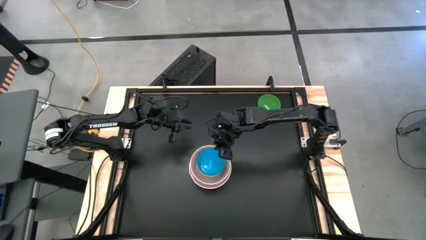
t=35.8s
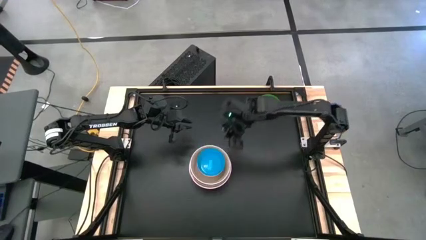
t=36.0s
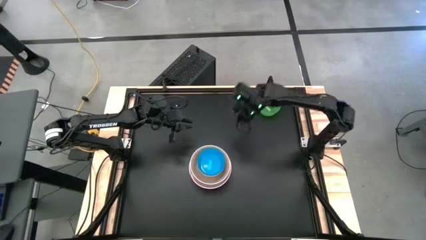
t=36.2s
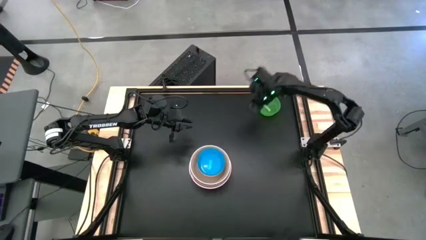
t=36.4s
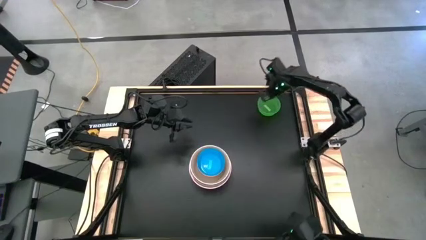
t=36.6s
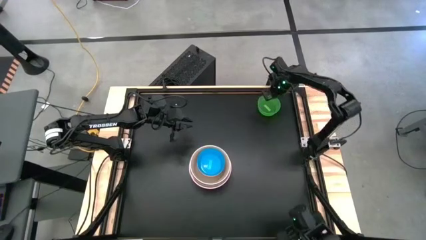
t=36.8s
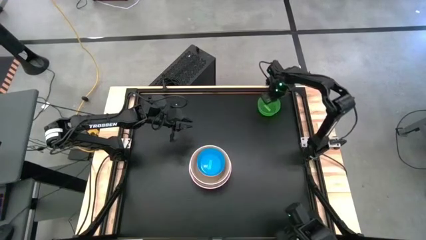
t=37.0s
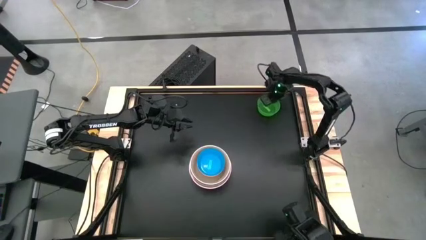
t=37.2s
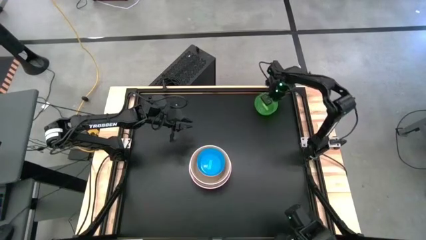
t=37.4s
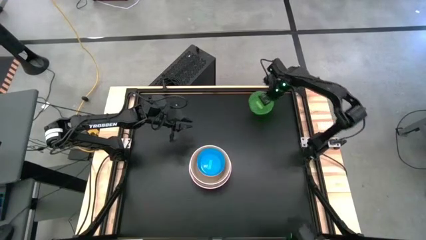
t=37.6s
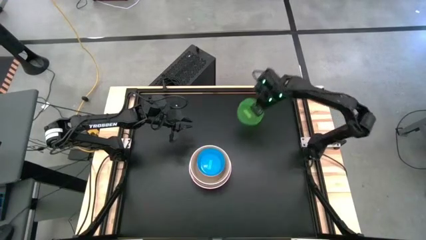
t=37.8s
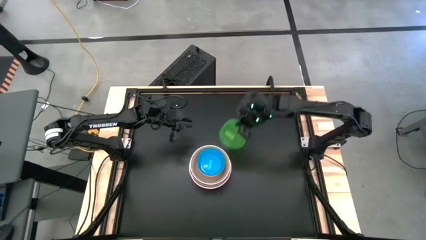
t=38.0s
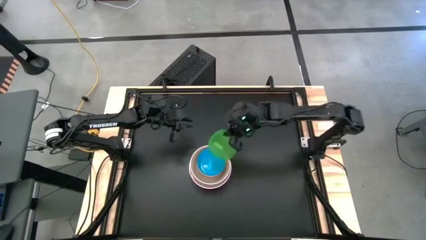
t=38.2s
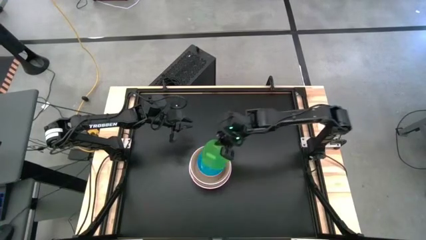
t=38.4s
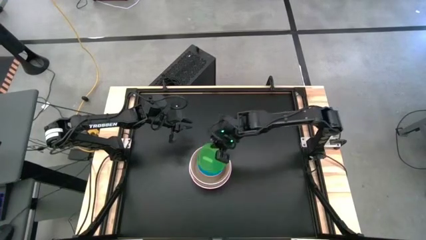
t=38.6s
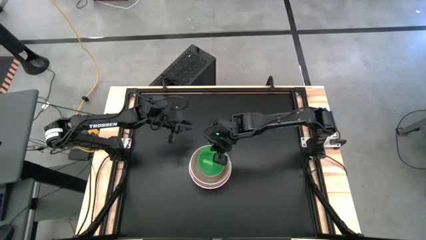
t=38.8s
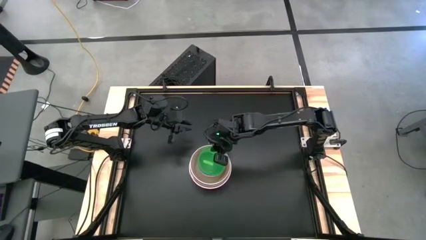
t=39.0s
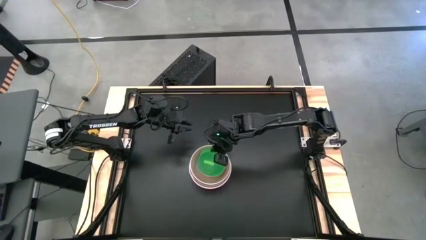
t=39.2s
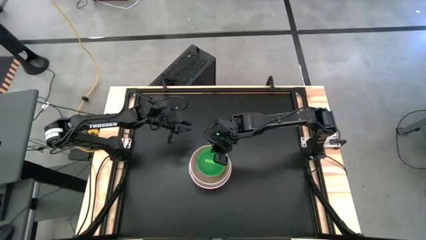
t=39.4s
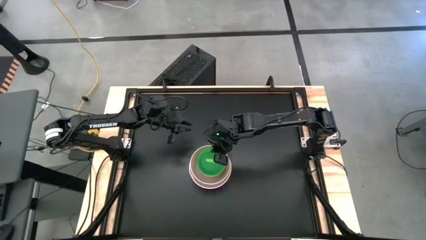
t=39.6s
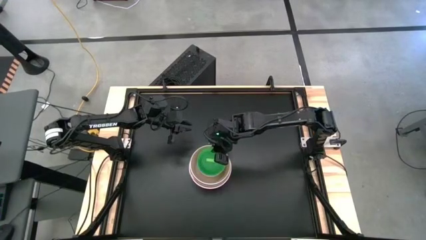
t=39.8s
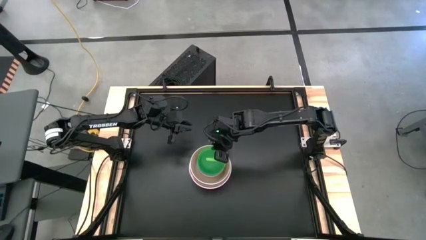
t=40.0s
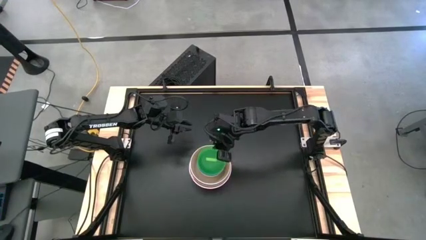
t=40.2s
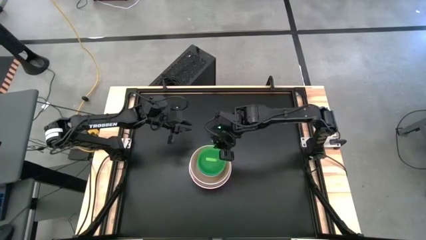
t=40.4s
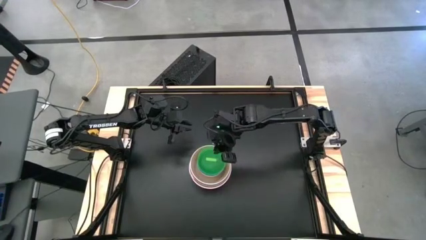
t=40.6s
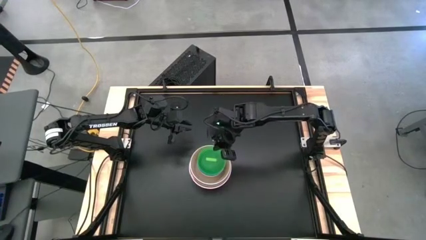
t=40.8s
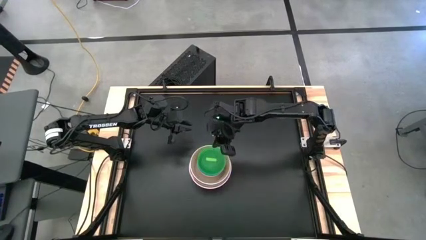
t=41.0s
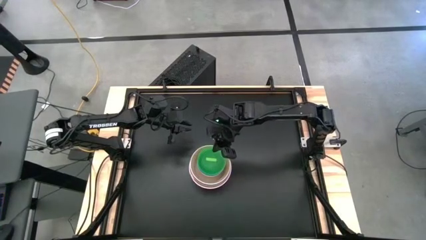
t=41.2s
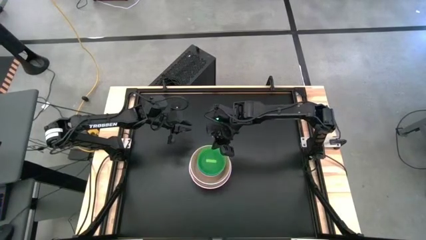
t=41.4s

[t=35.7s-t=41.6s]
Stack the transparent green bowl into the transparent blue bowl

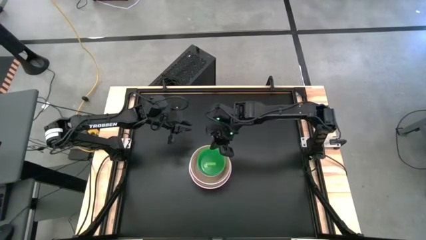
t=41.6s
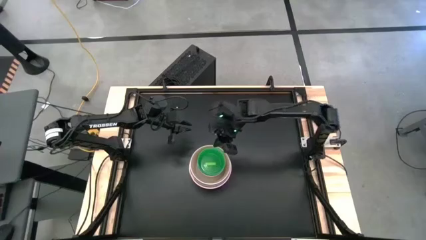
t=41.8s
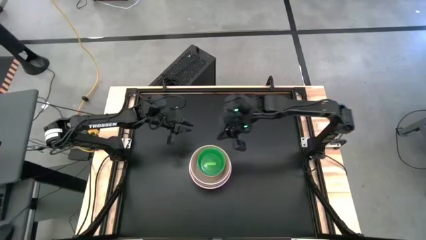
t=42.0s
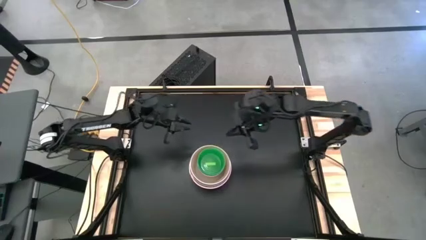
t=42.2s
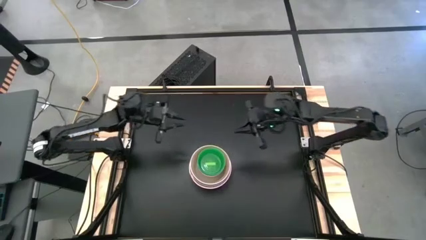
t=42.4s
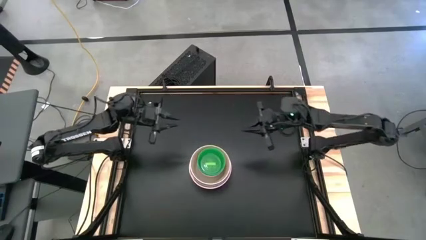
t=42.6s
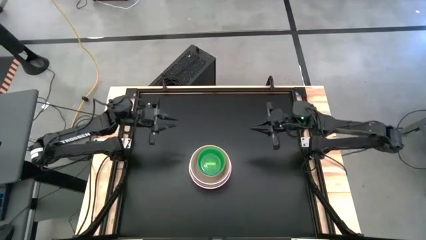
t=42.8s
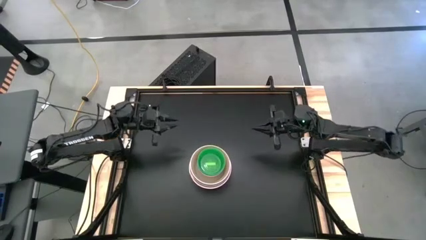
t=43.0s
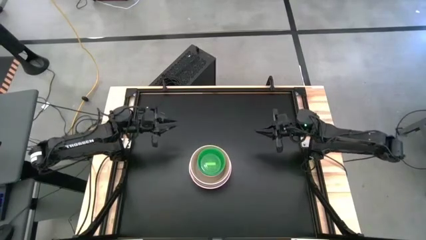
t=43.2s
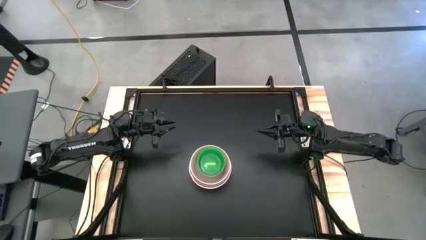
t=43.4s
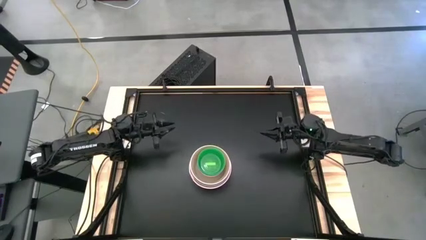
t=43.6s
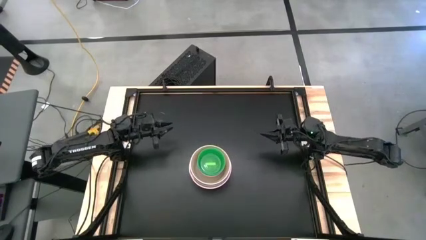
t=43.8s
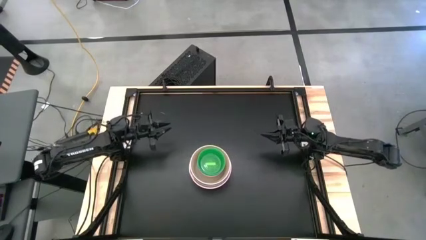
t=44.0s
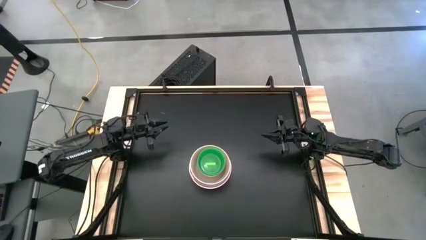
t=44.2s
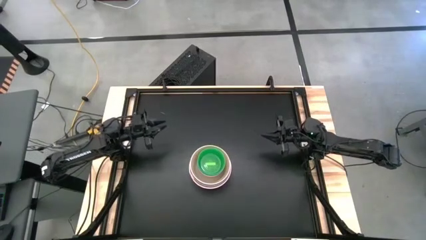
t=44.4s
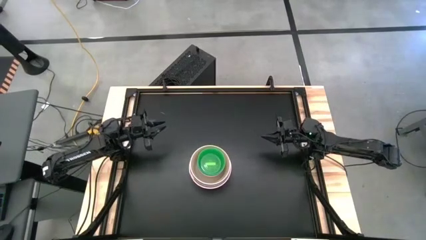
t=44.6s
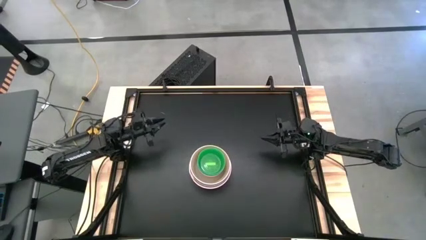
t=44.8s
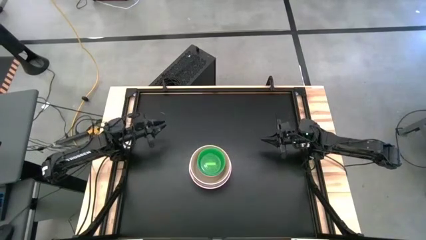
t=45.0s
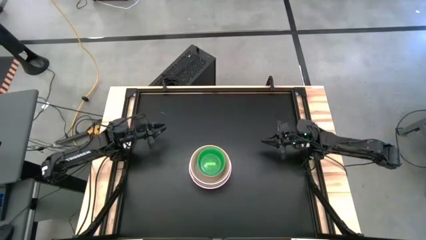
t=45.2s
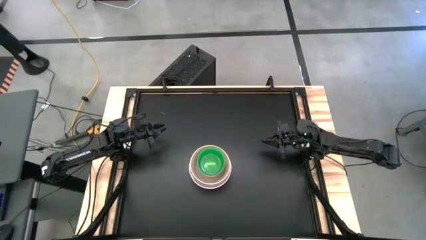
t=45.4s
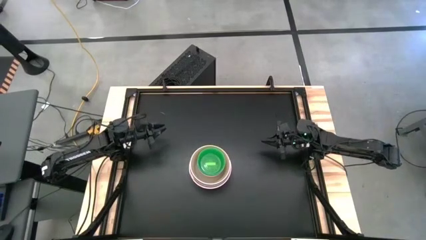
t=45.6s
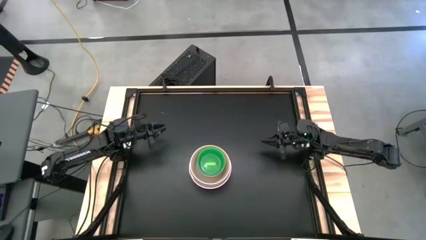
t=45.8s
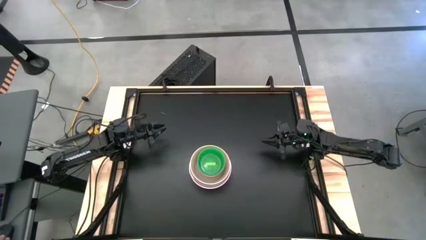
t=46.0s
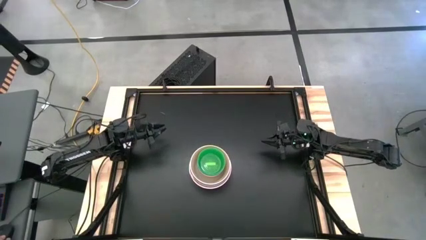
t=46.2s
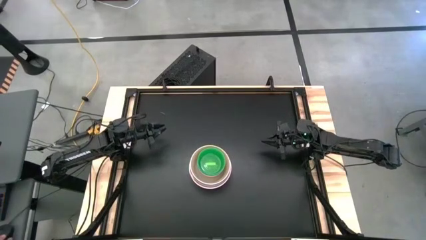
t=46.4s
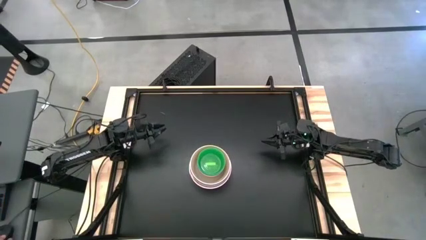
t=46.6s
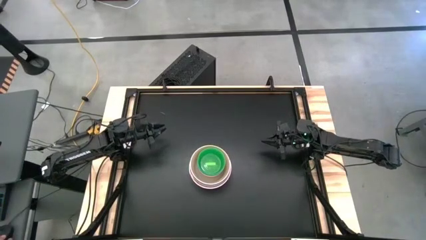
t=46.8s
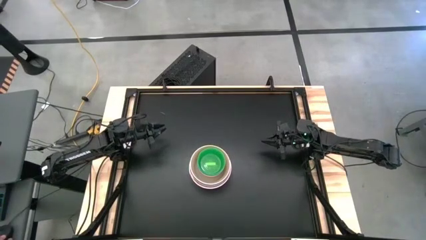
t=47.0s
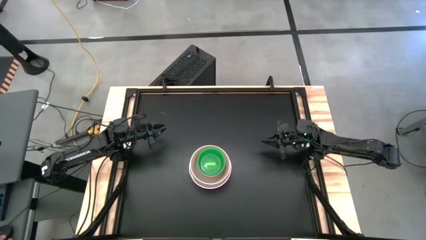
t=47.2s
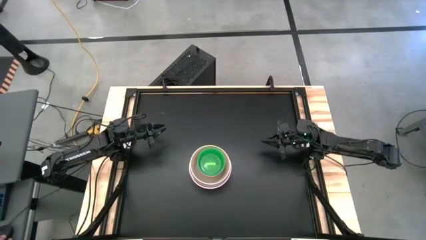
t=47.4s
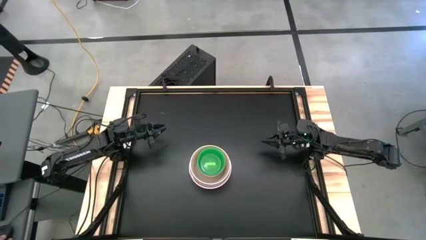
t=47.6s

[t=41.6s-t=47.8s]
Return to Home Position
